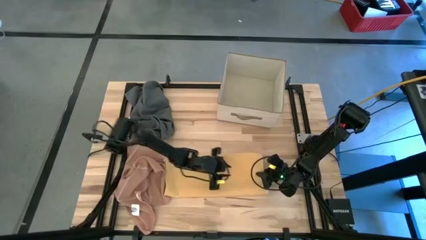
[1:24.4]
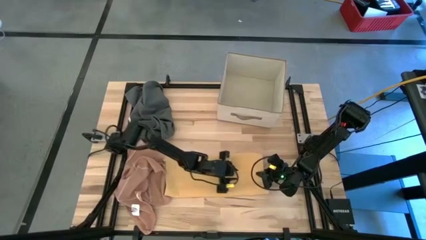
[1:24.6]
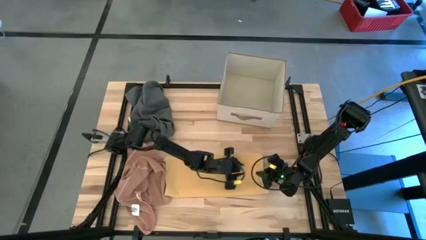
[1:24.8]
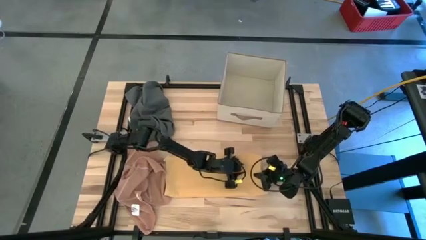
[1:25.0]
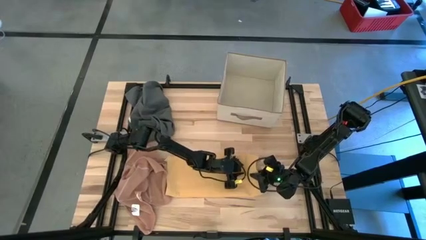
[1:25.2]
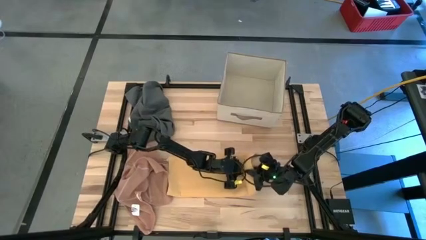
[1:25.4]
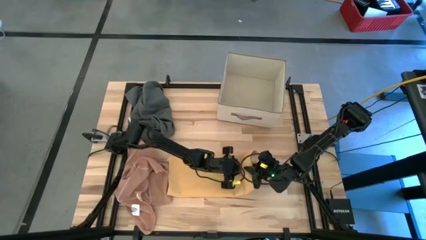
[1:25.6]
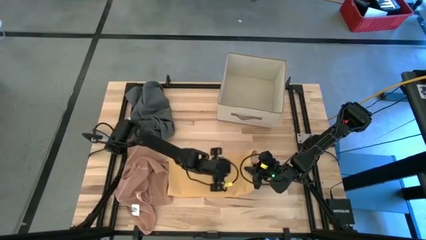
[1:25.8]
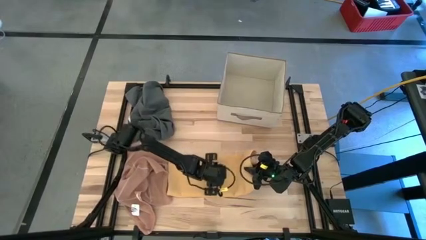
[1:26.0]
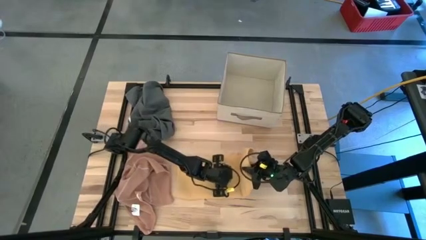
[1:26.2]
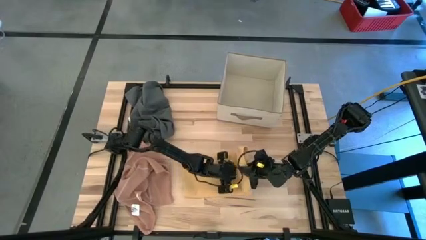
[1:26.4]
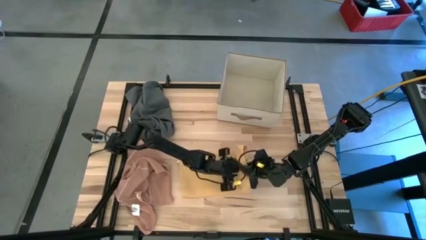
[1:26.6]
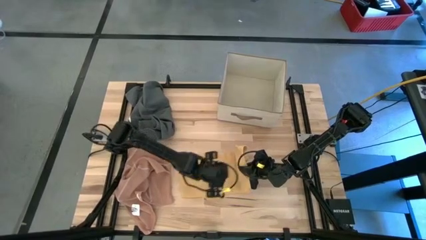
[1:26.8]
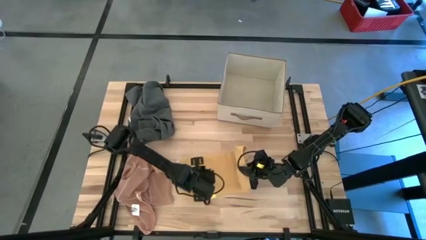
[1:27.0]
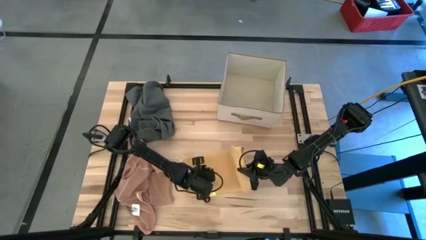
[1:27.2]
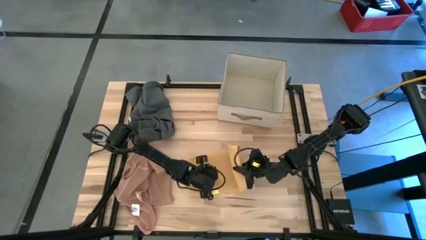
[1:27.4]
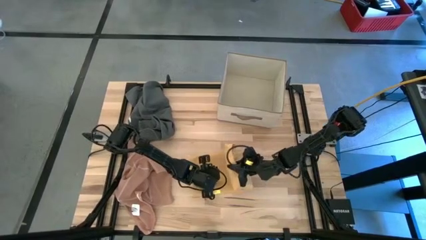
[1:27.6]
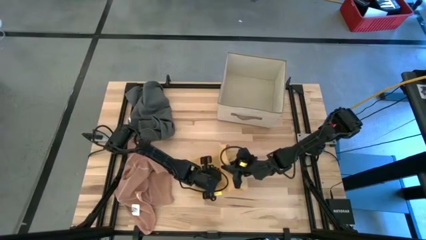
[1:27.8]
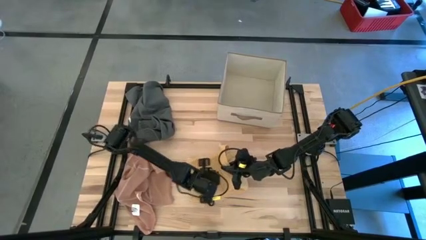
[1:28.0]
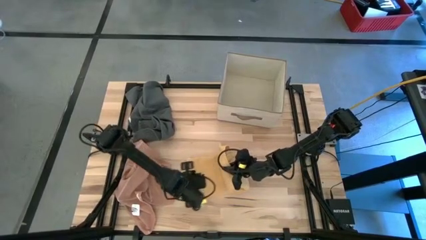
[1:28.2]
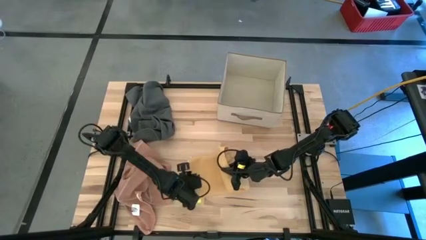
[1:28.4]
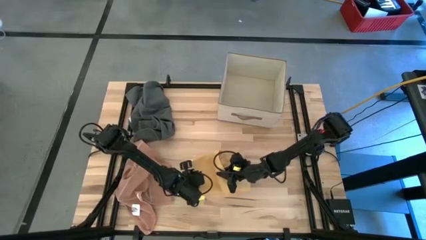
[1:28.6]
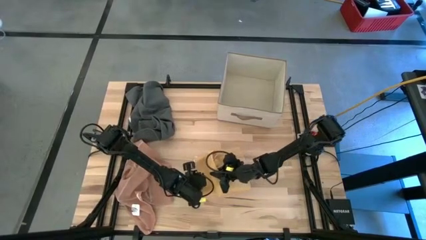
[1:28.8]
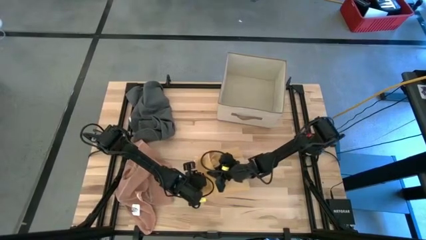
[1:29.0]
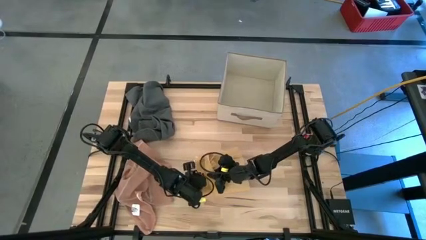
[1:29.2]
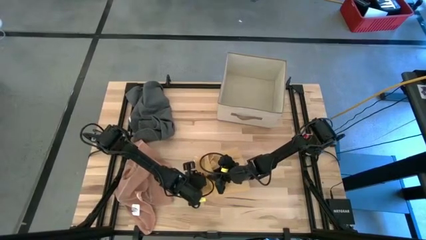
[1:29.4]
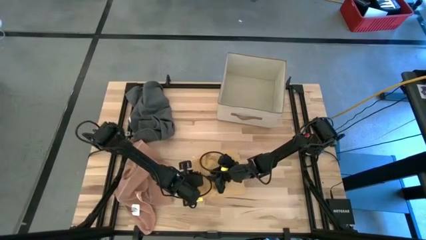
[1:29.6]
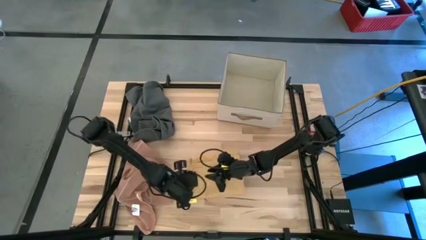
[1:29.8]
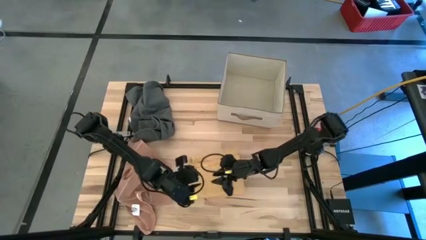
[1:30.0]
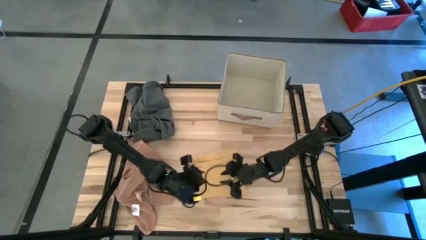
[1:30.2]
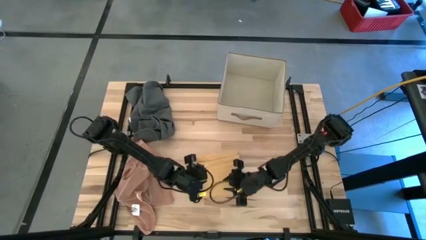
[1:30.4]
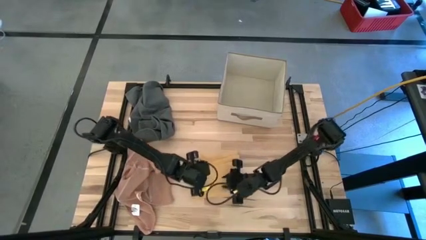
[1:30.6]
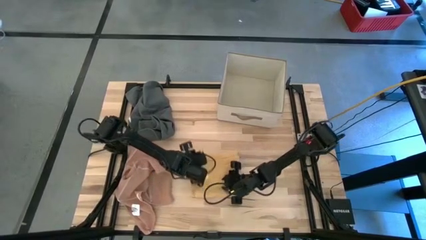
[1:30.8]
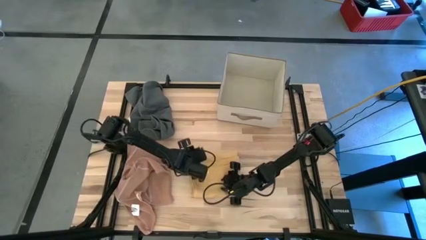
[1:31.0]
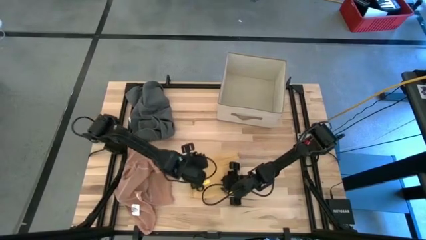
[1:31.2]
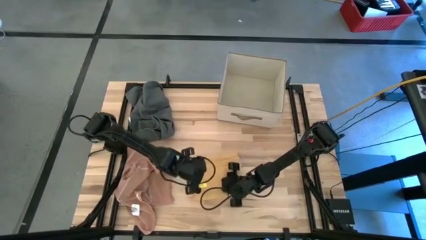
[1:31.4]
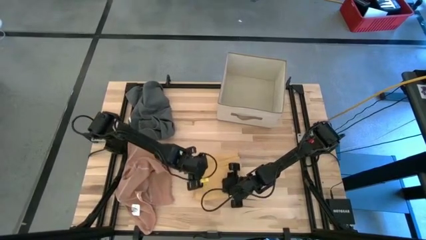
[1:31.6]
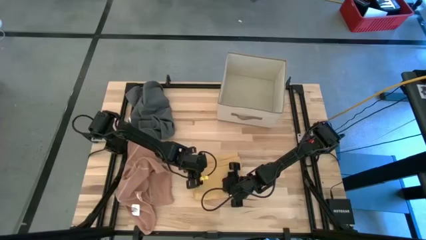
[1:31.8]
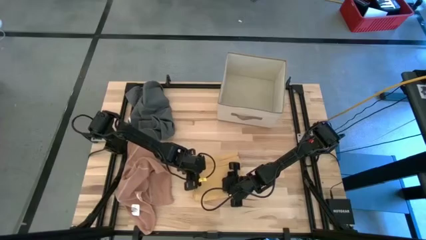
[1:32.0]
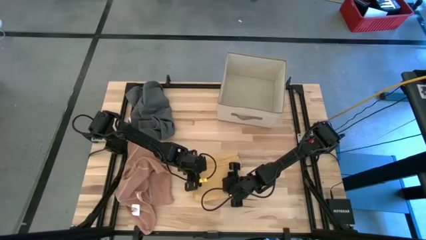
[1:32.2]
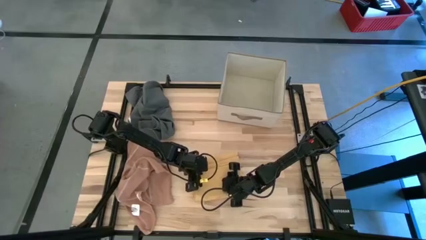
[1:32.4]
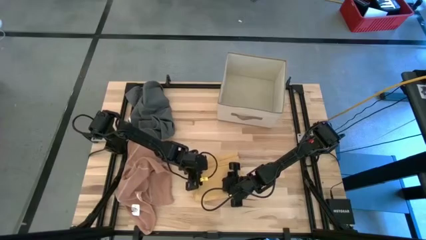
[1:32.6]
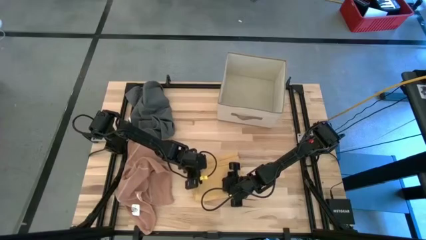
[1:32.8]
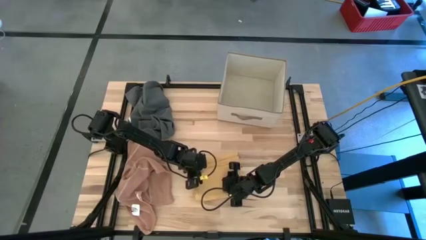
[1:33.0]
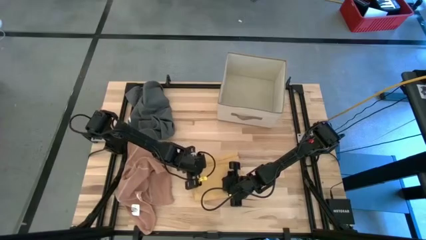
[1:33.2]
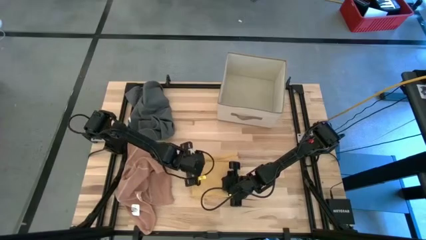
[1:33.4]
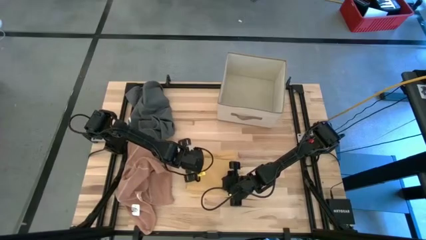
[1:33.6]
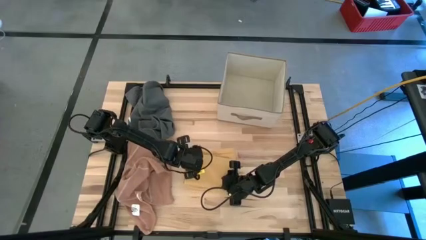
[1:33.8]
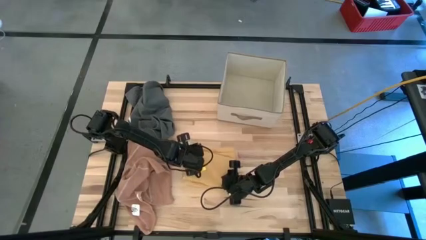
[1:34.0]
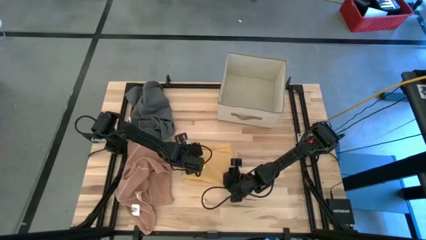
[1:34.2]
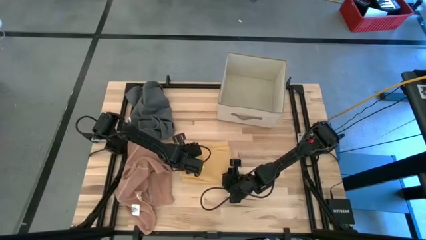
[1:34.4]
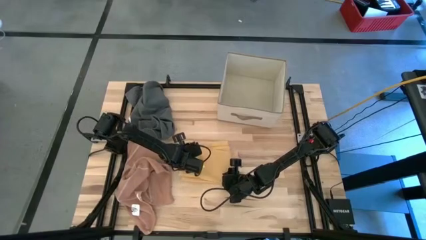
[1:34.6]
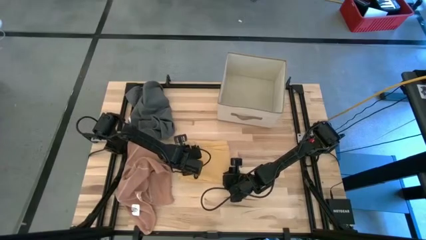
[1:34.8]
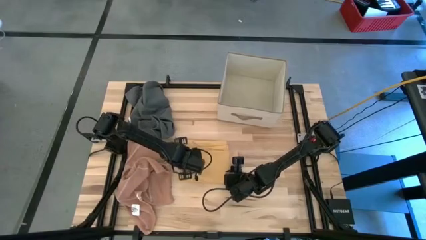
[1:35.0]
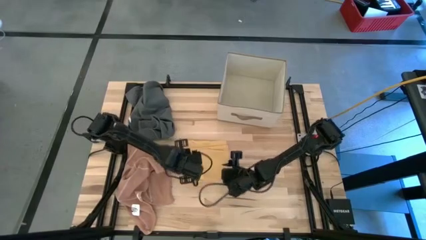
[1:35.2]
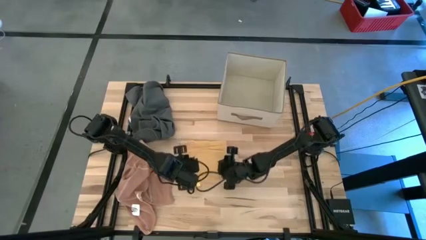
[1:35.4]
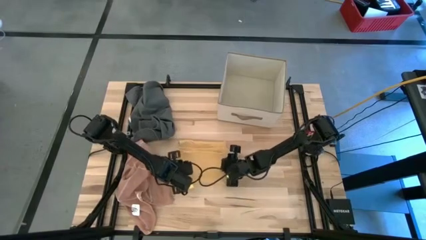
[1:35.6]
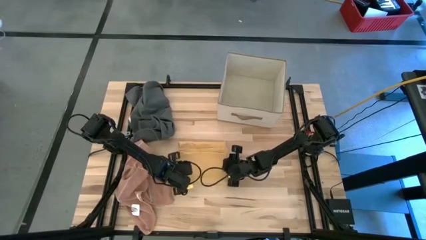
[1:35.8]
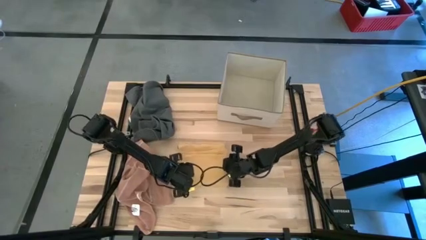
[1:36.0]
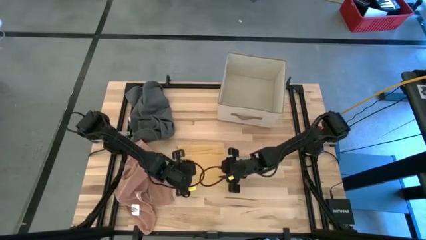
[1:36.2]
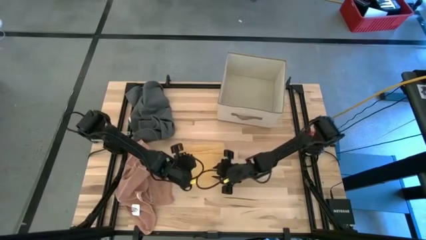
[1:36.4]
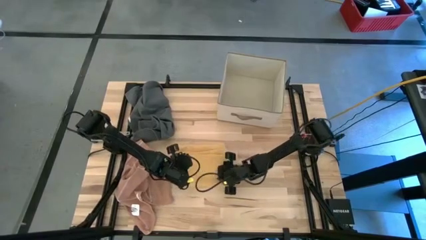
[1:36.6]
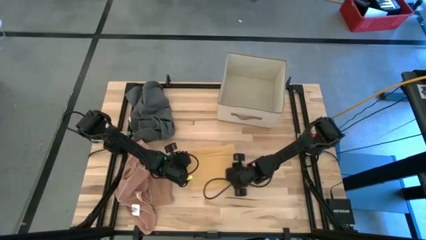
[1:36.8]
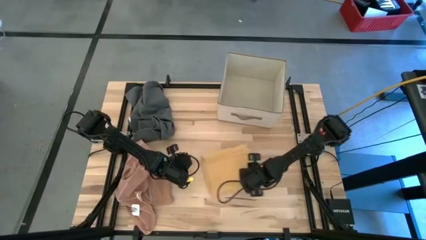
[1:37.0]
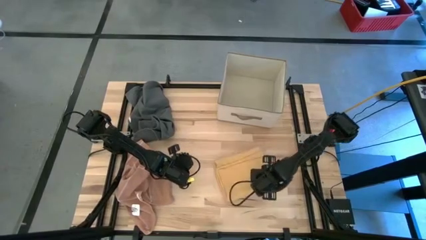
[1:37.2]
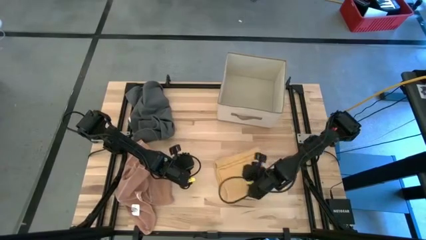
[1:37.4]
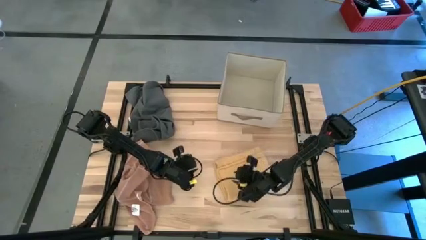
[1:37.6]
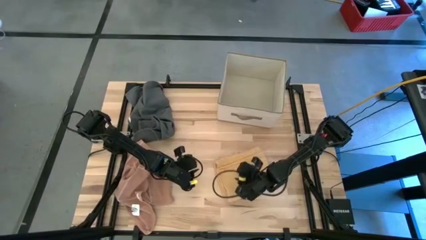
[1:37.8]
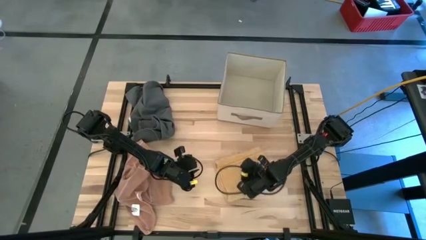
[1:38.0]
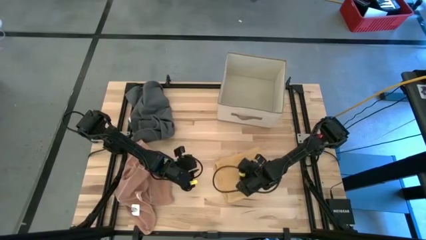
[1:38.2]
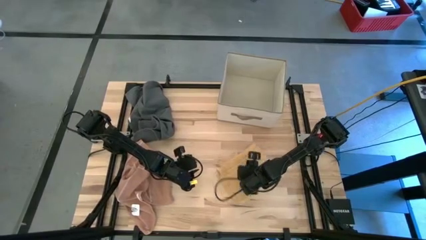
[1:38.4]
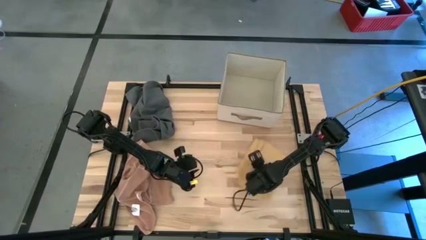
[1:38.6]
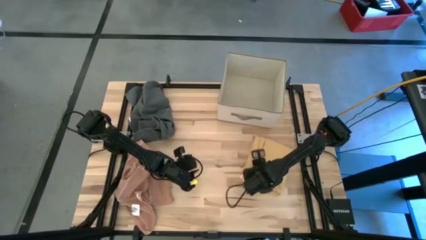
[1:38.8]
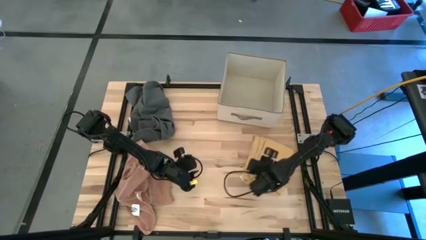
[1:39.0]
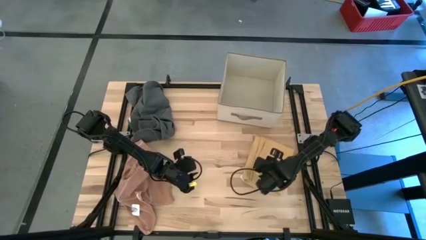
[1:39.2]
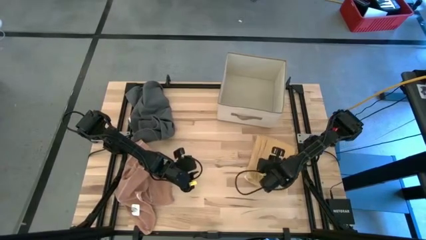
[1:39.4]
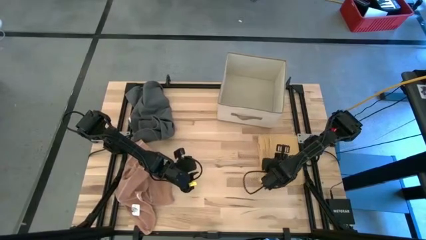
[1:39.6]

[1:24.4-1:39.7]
Task: Fold towel
Fold the yellow towel

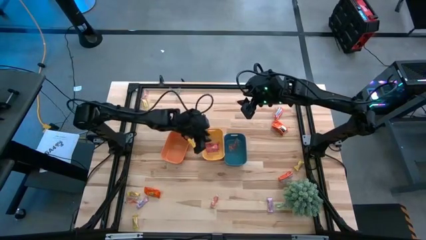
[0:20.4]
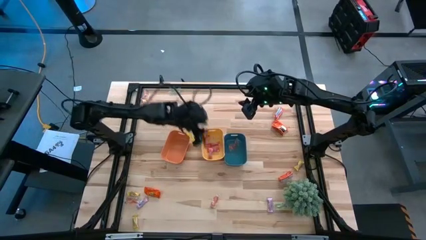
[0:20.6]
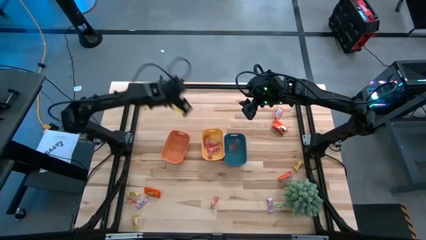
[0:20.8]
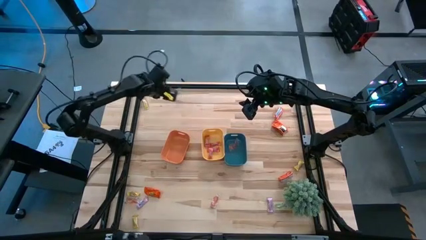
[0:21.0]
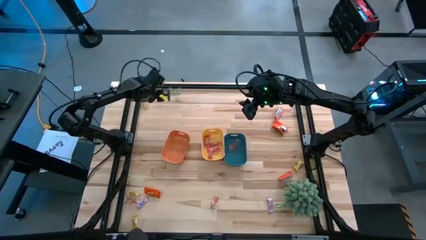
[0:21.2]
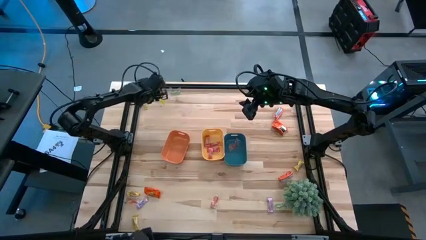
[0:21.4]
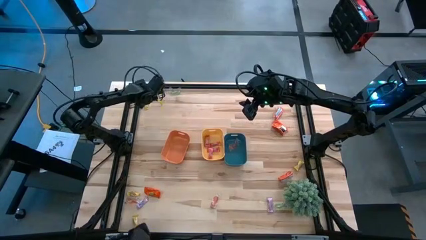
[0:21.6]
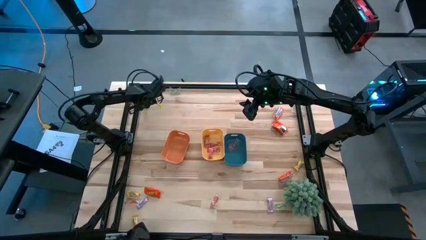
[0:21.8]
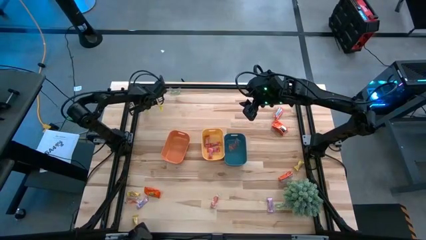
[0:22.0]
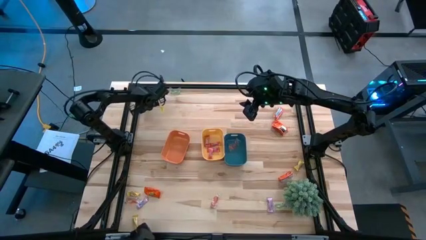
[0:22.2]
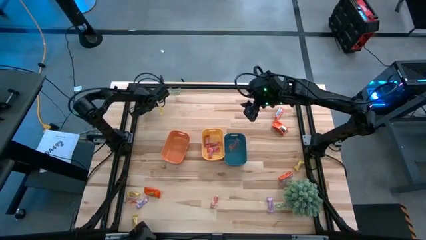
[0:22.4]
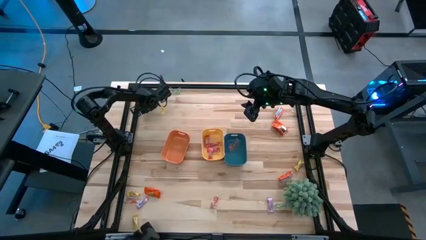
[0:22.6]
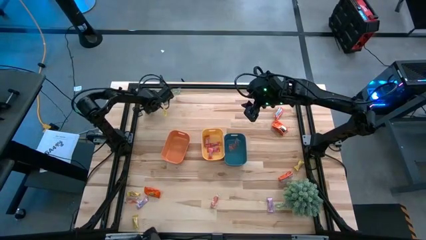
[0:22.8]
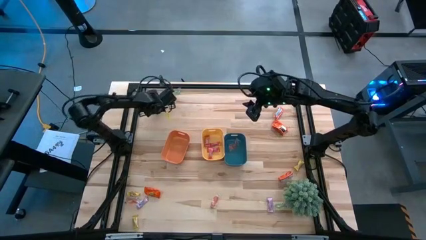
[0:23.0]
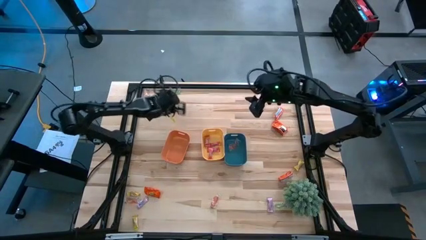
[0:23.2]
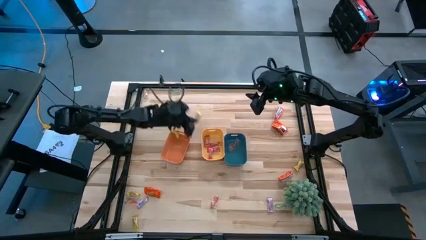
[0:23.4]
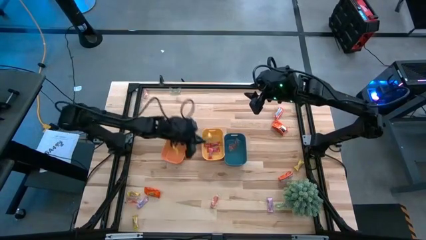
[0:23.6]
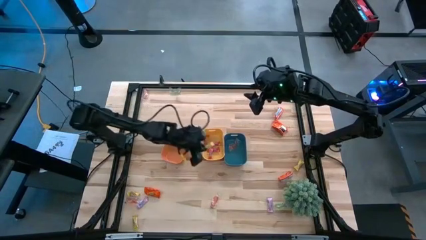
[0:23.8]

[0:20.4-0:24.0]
Task: Sort candy
Put the yellow candy into the yellow bin
